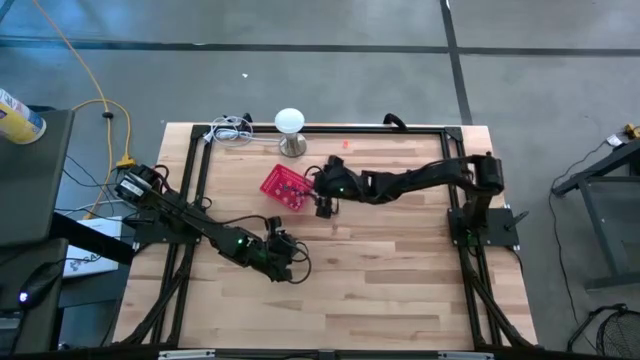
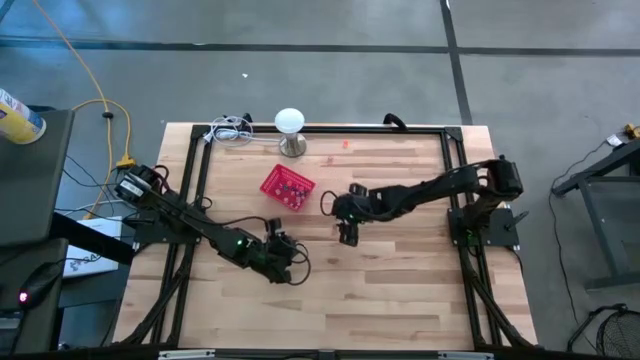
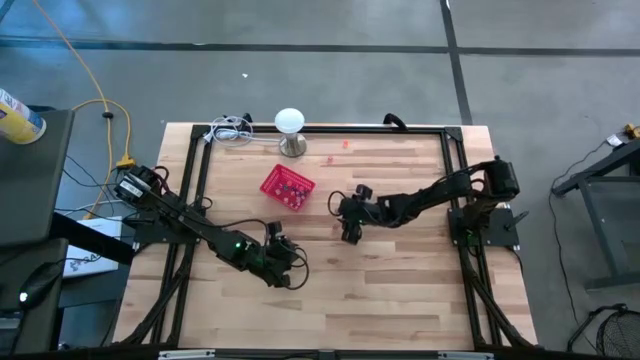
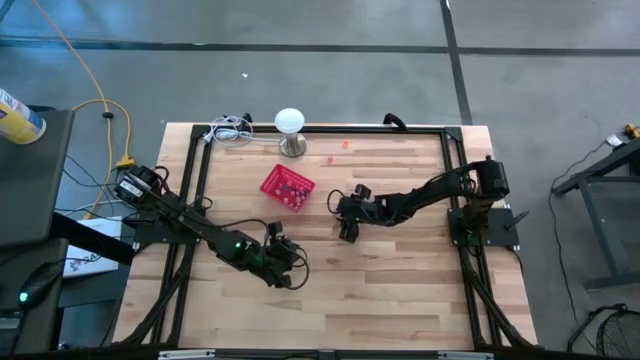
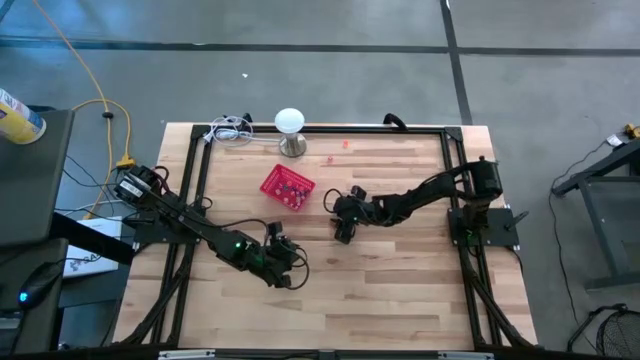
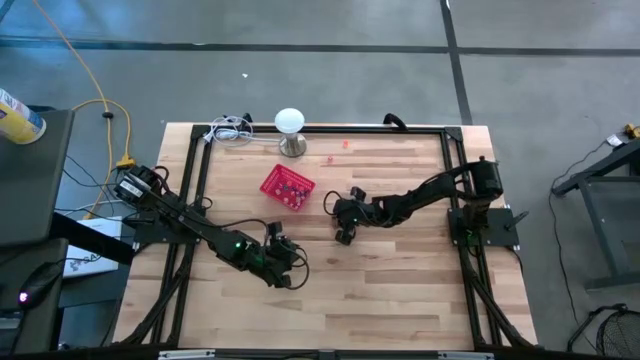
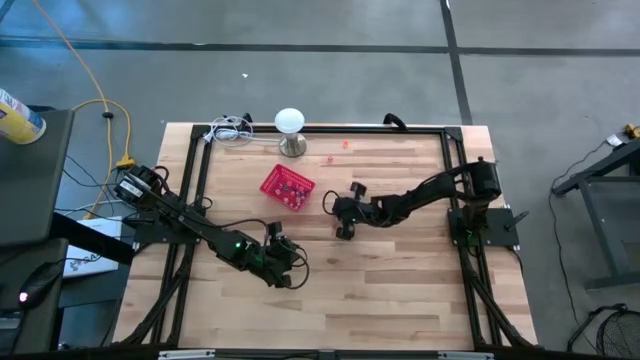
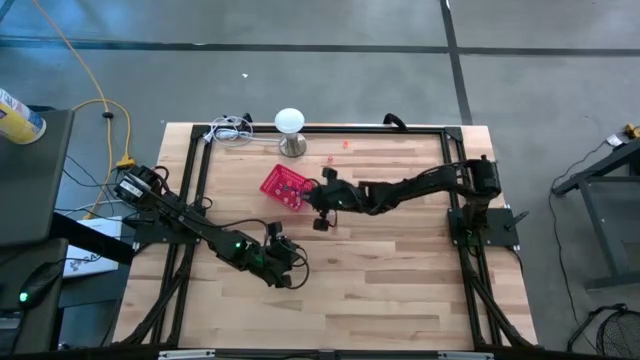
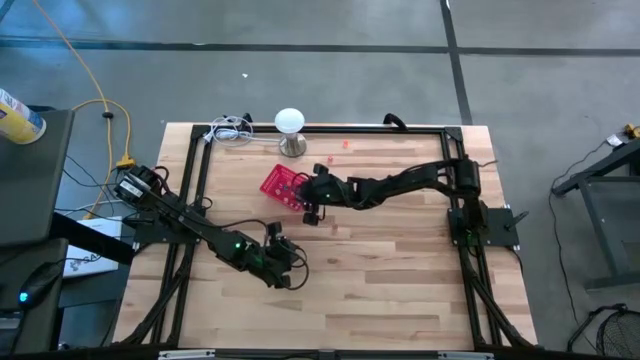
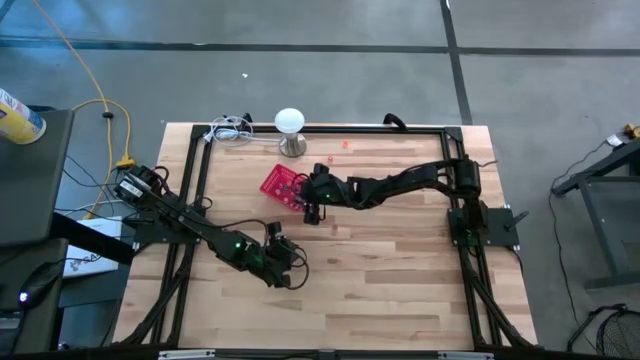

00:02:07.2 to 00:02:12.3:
Task: Pick & Place Dice
Put the dark blue die into the red basket

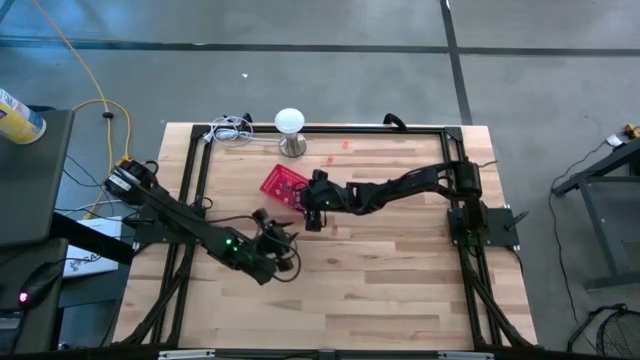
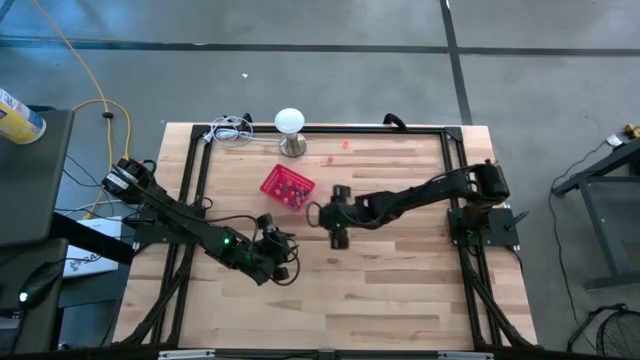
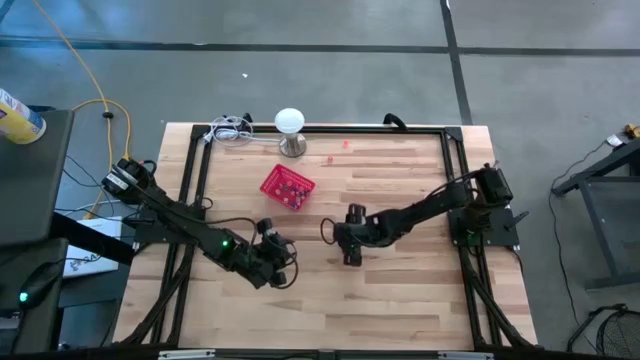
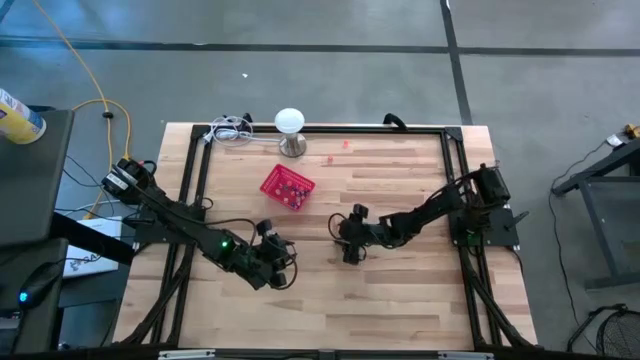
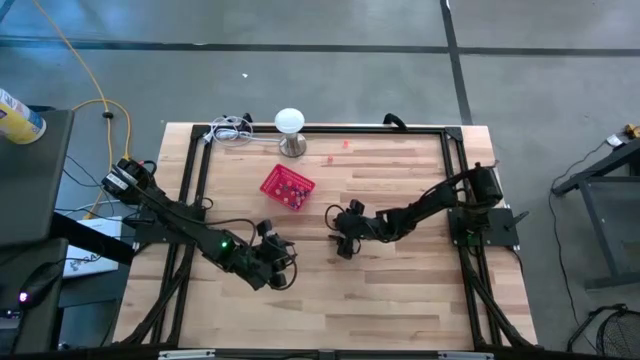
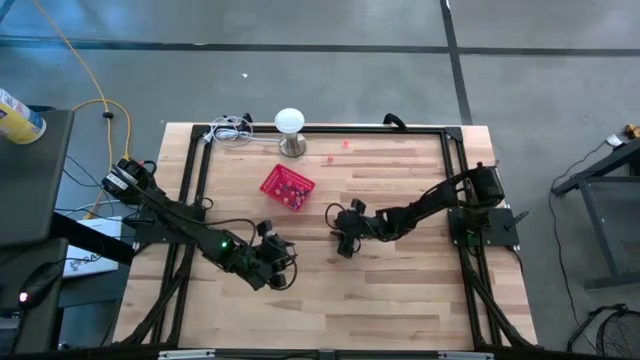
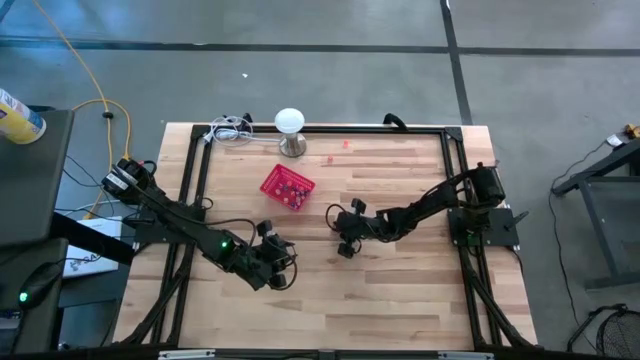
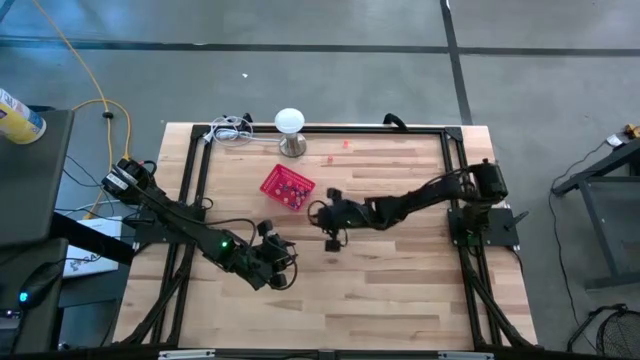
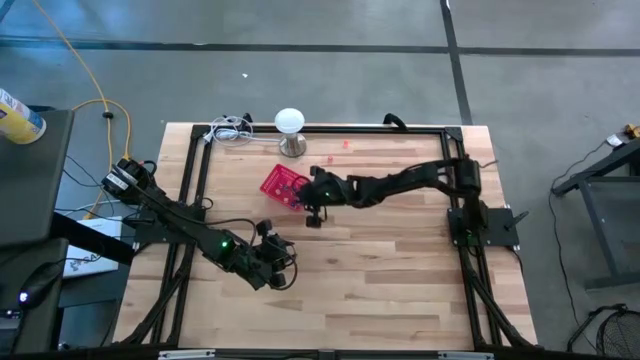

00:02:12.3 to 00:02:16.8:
Put the red die into the red basket

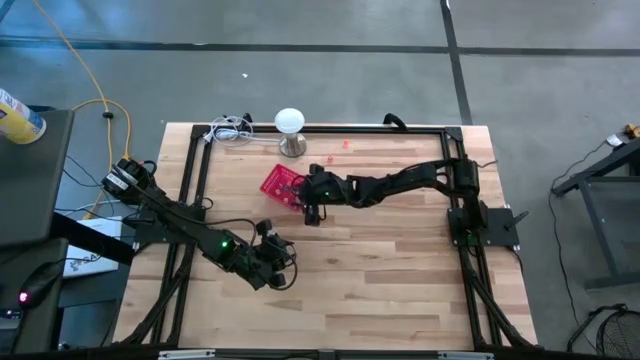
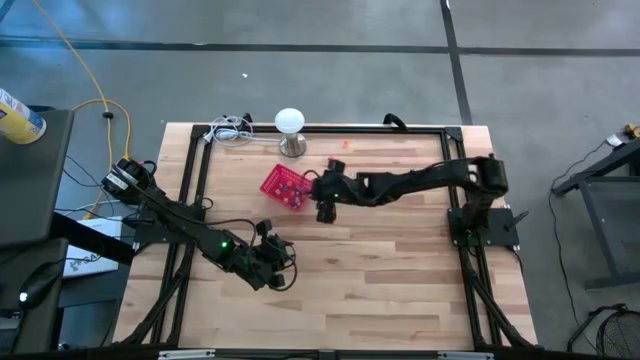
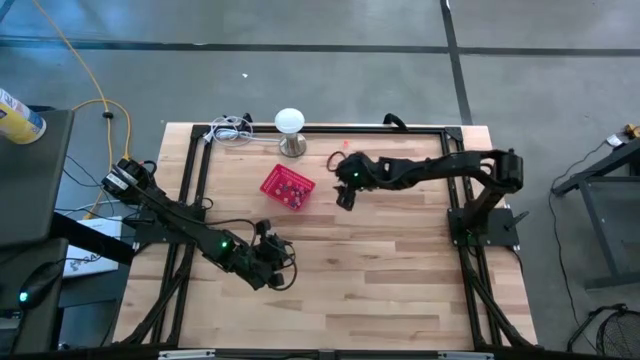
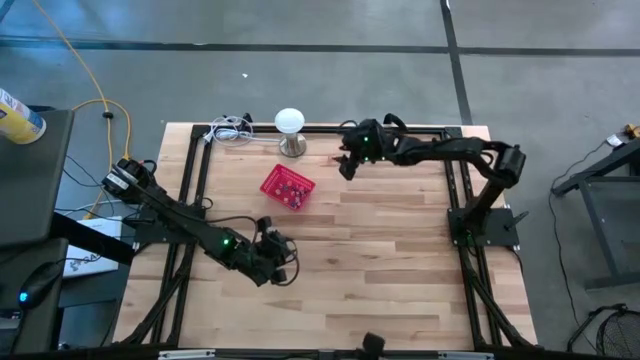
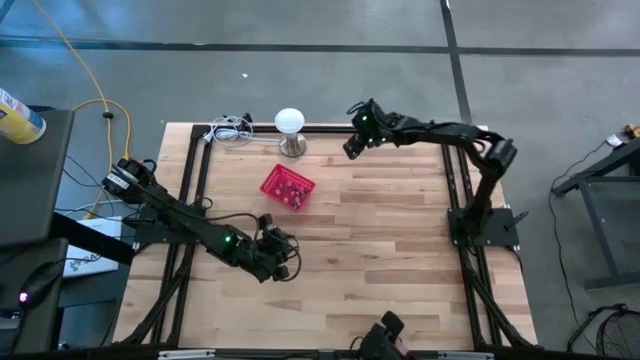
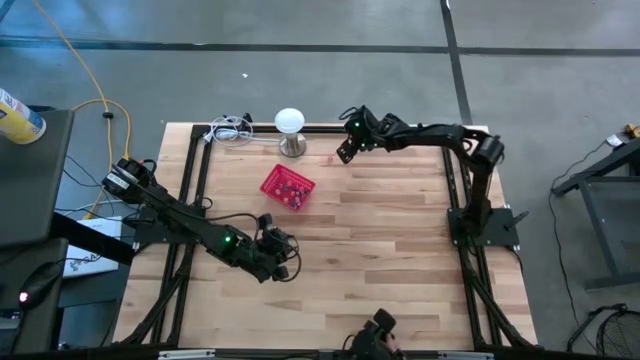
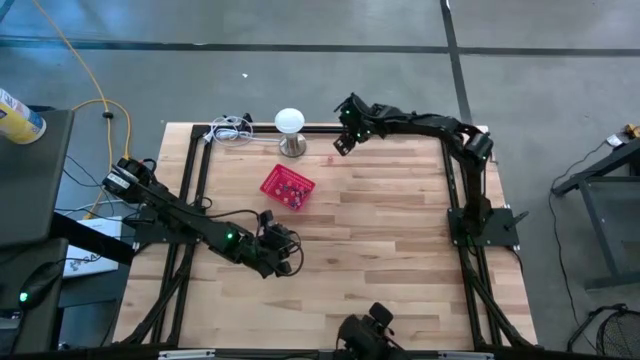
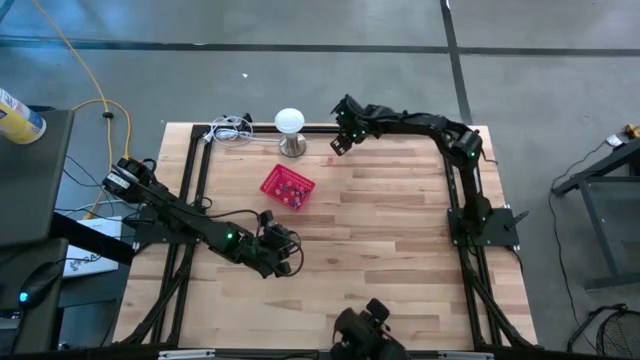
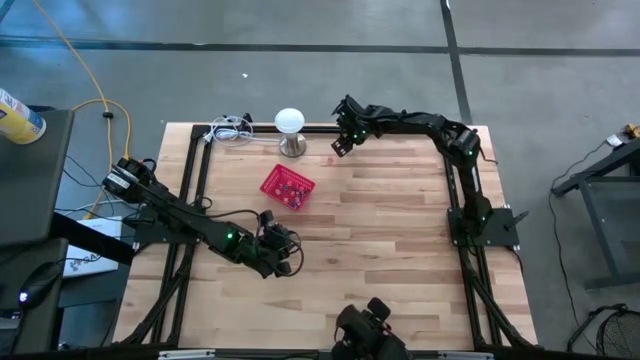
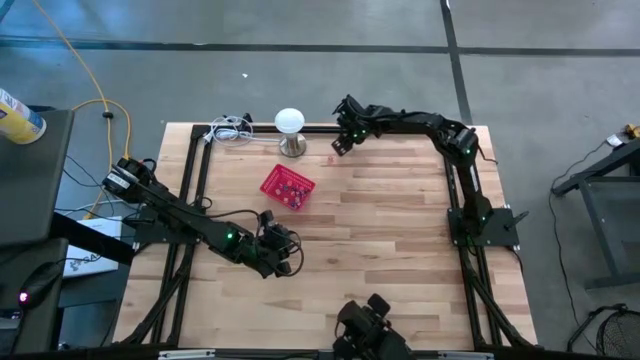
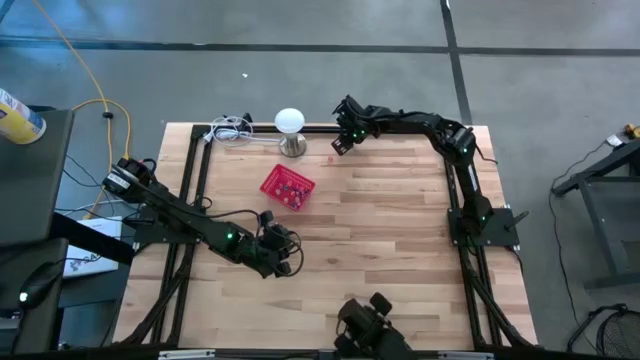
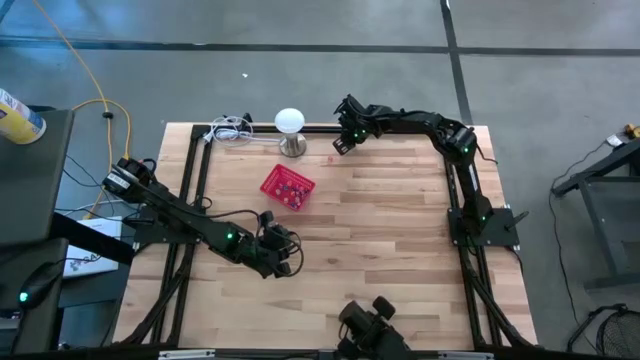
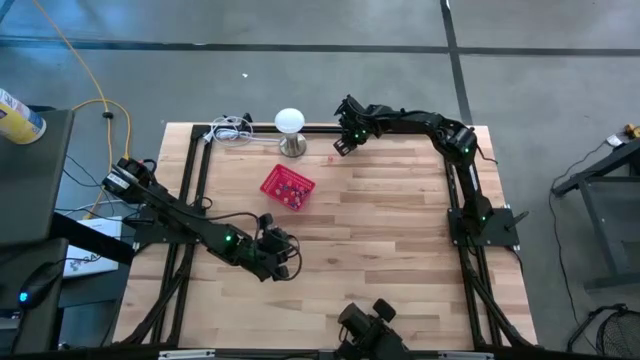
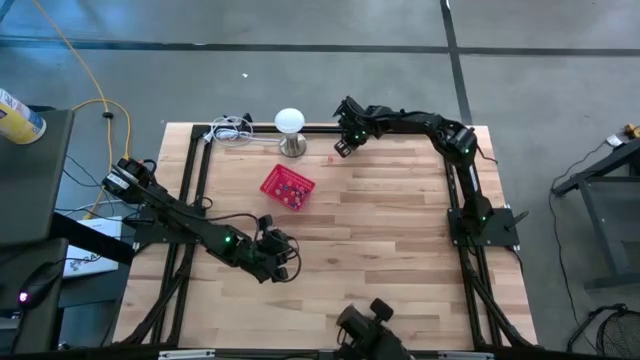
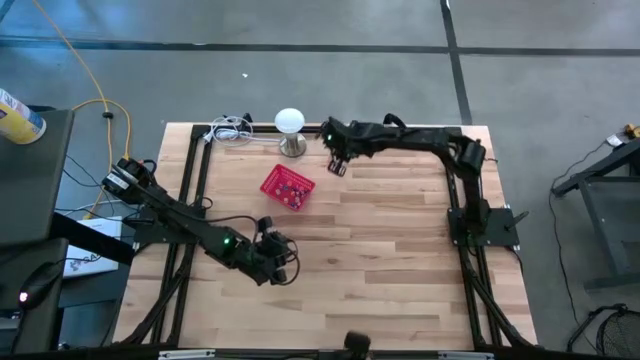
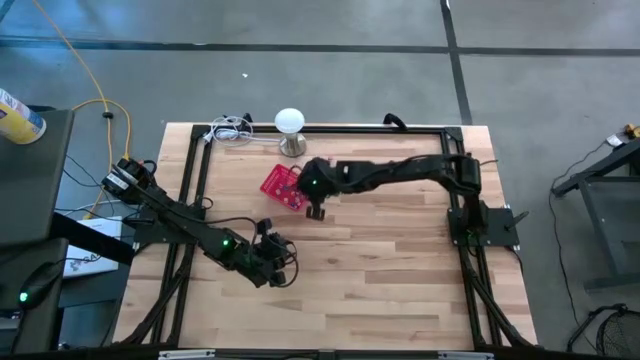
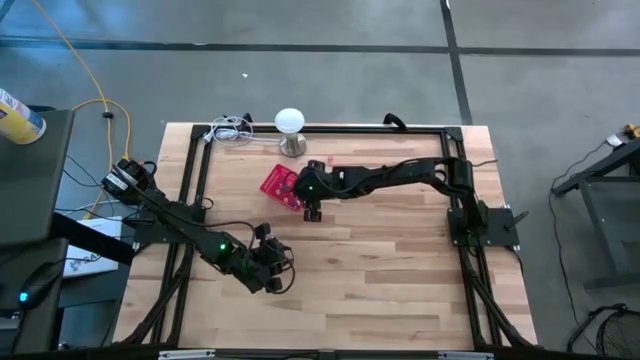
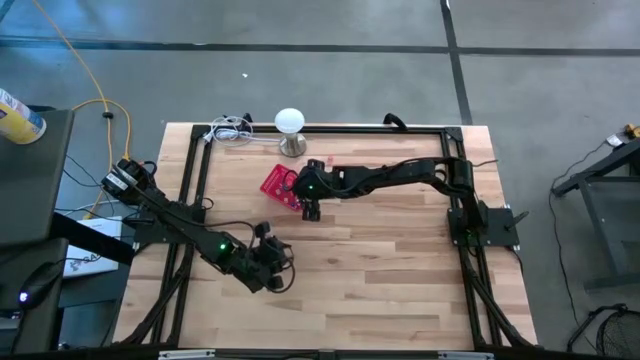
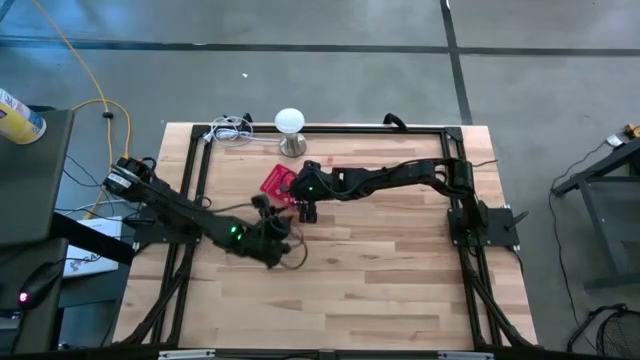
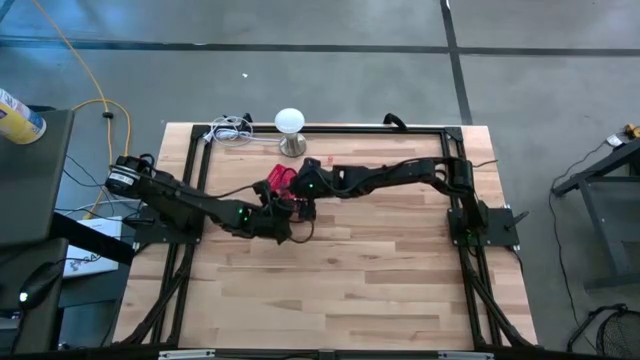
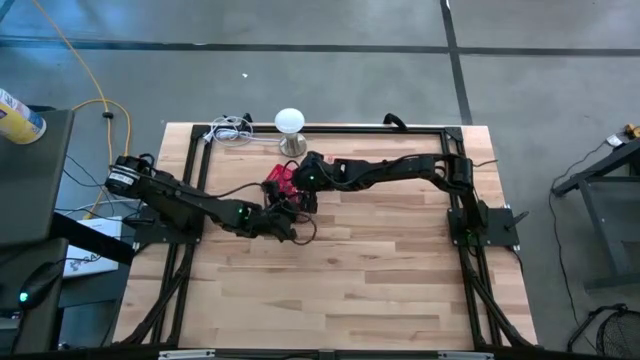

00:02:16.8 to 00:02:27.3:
Put the orange die into the red basket
